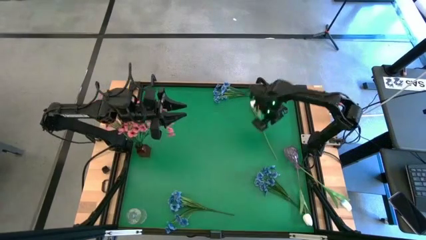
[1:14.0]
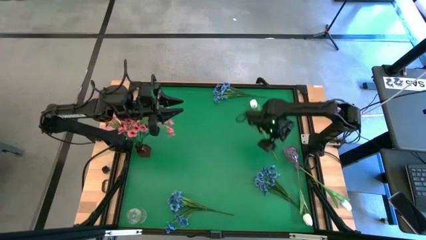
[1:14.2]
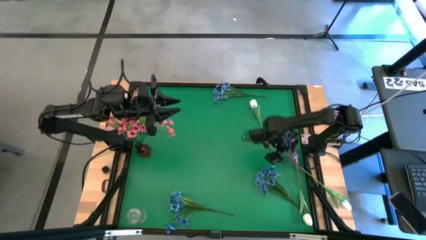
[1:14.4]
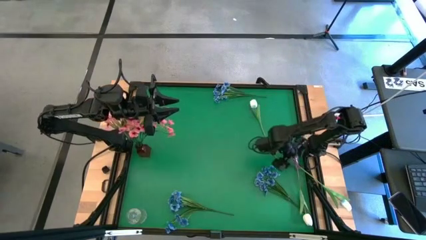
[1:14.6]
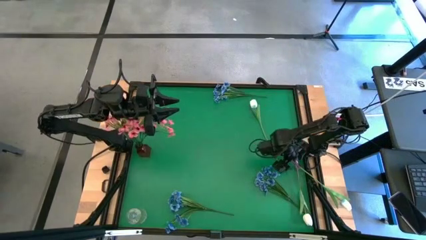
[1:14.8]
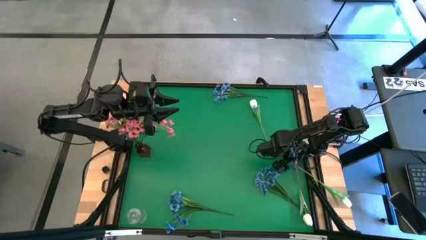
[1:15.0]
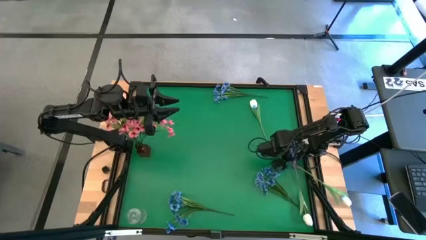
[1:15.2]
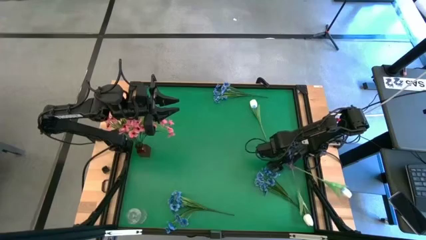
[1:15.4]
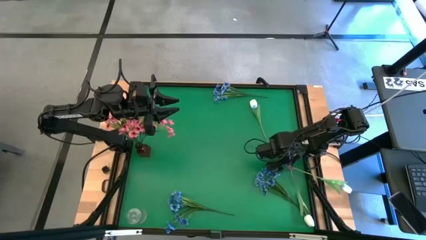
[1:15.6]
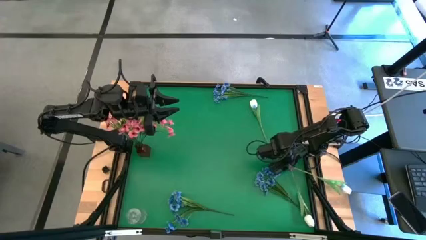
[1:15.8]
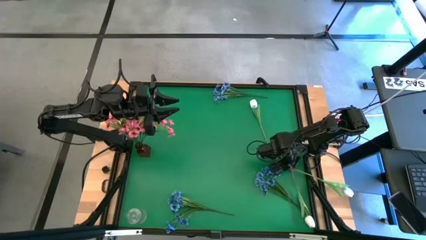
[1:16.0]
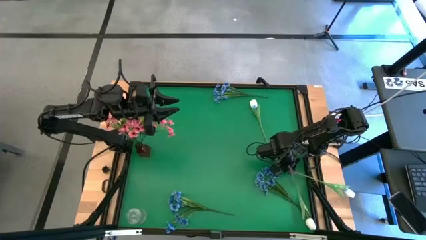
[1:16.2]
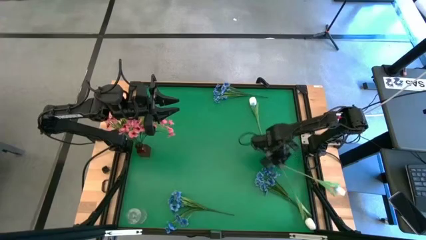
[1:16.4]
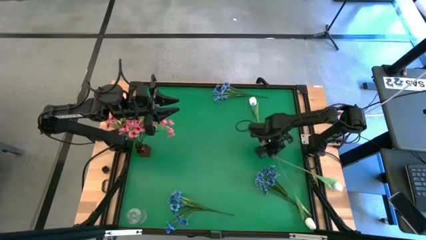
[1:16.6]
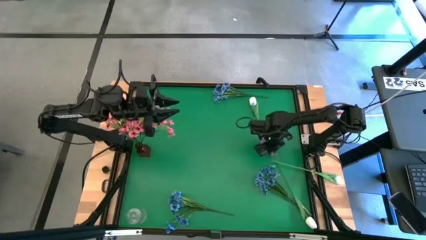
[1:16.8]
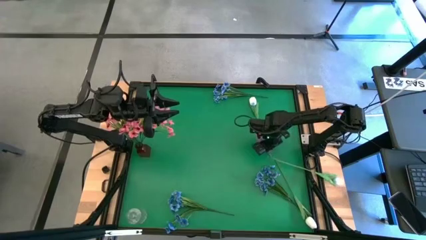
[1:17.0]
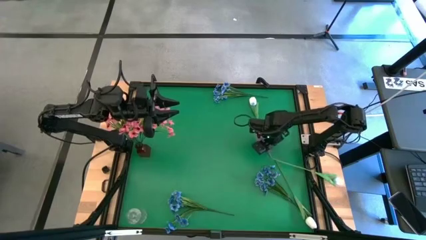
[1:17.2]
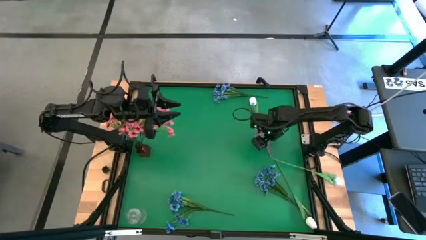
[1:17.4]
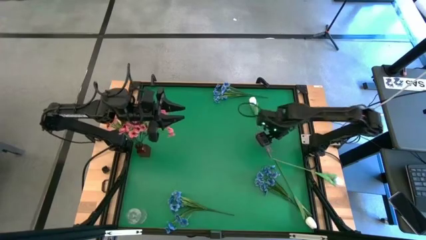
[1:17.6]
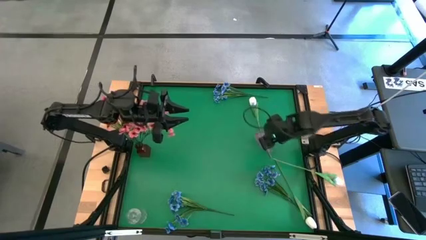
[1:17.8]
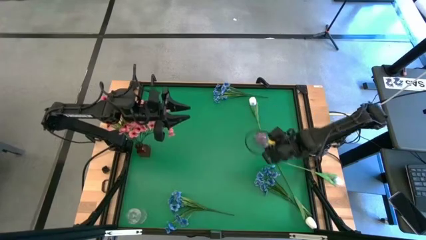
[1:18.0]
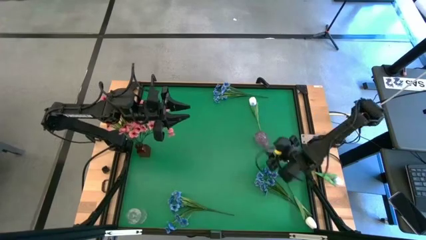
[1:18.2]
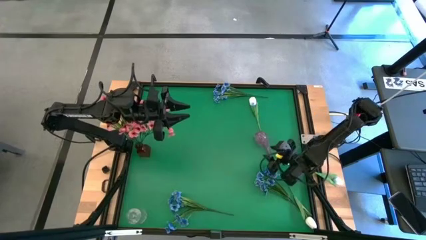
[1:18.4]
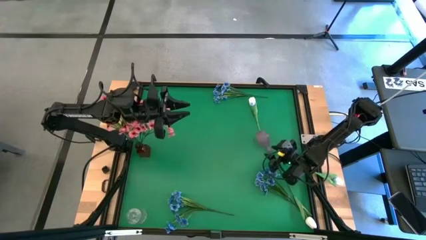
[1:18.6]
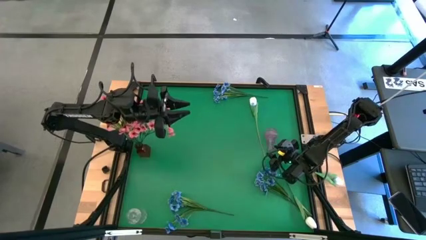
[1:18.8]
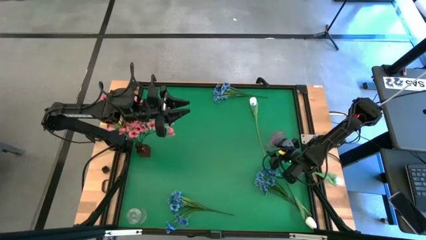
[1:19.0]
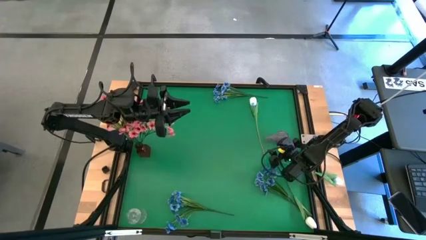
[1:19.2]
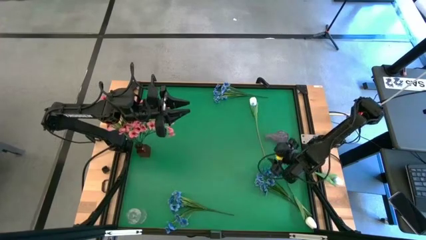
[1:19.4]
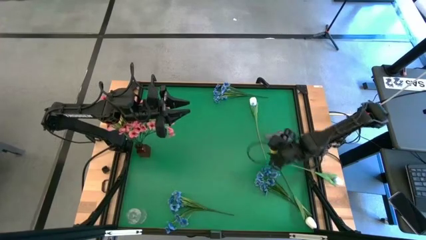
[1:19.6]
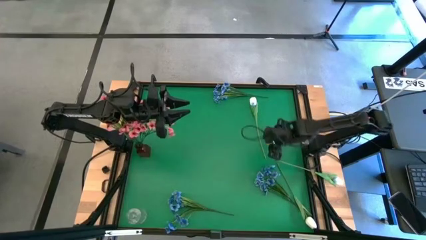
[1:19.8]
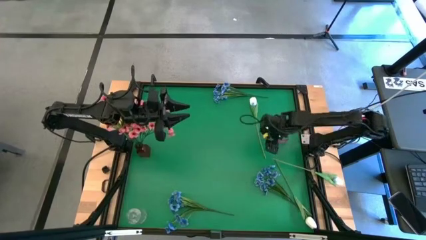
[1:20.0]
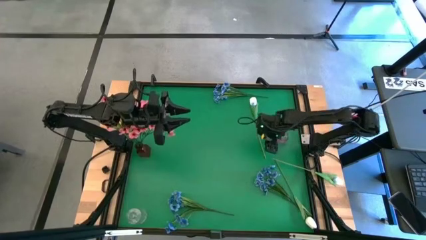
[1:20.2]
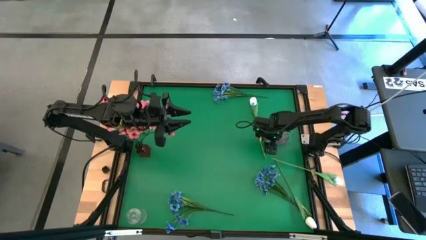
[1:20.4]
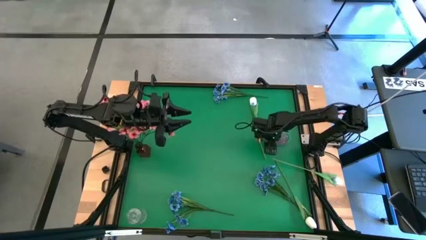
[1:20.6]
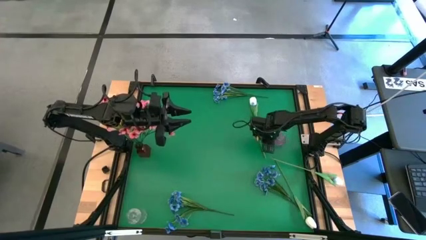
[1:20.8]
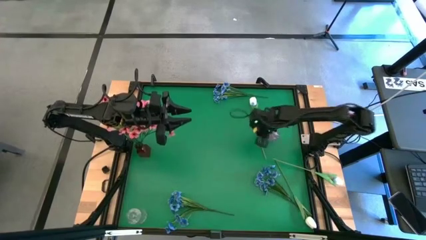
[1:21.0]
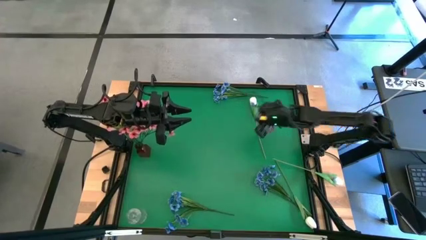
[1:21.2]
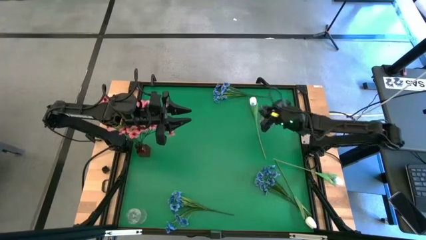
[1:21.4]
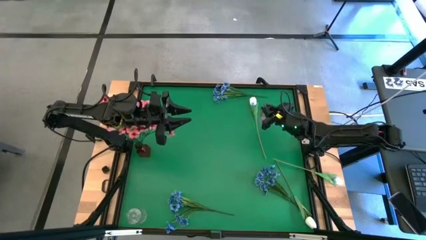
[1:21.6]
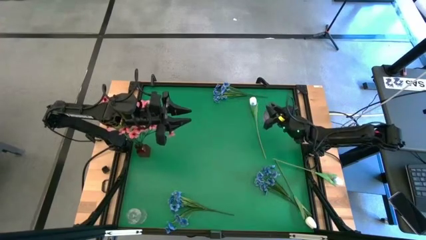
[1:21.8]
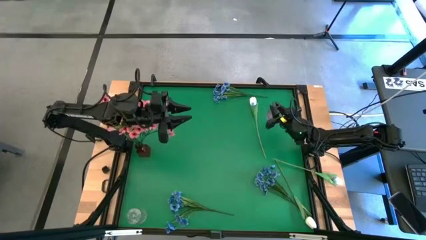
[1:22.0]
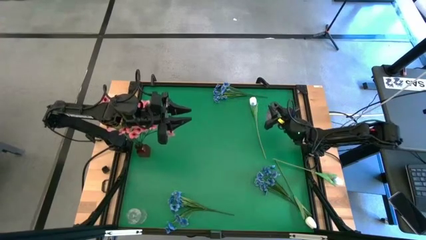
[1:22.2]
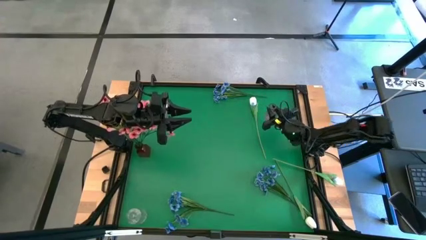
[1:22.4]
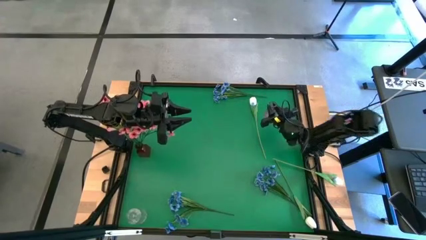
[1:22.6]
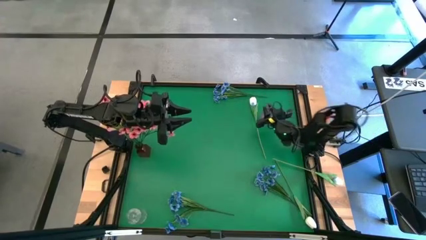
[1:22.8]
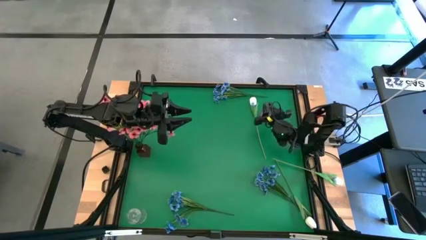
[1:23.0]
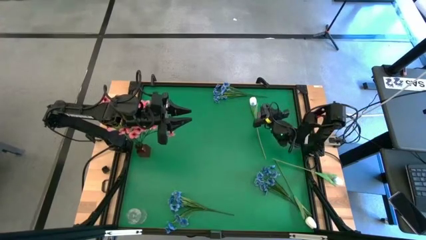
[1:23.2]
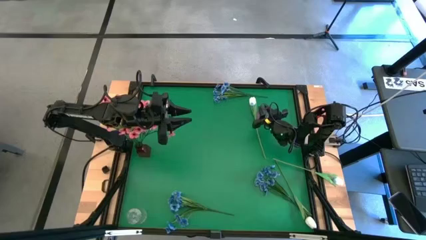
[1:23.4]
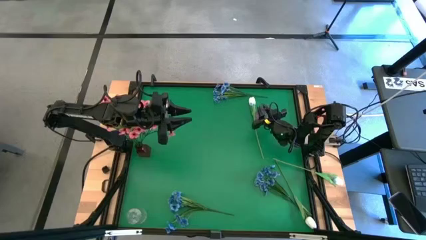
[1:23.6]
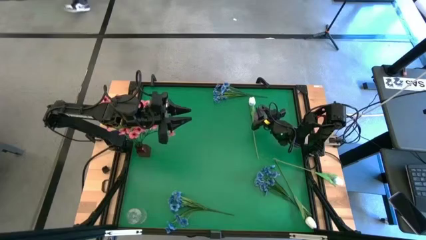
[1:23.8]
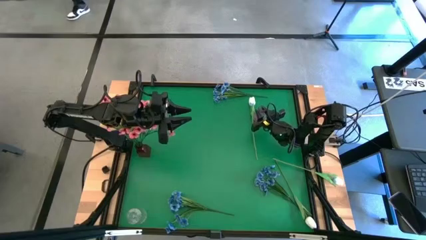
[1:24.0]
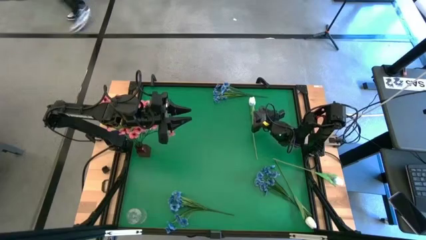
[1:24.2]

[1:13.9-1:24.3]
Task: Sort flowers into vase by color
Adjust the violet vase

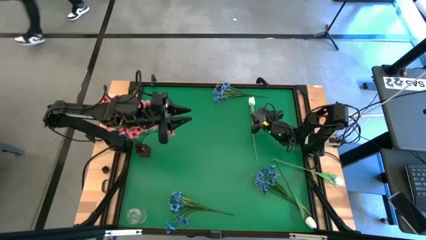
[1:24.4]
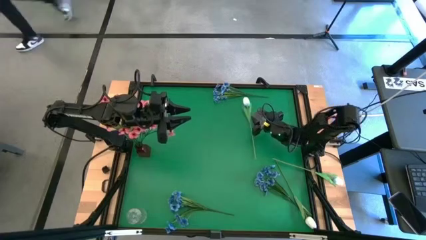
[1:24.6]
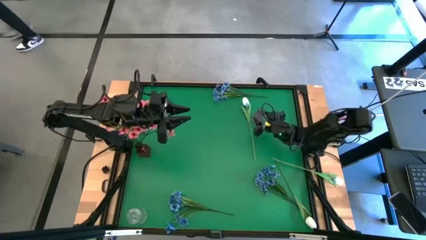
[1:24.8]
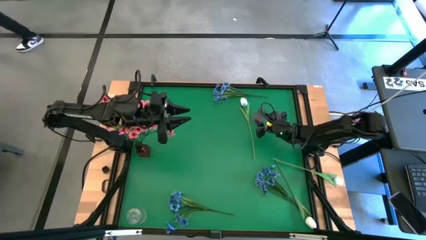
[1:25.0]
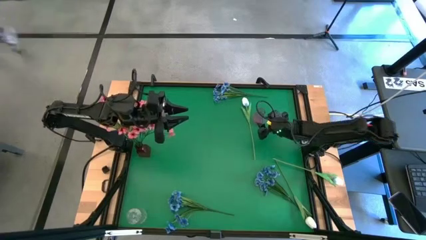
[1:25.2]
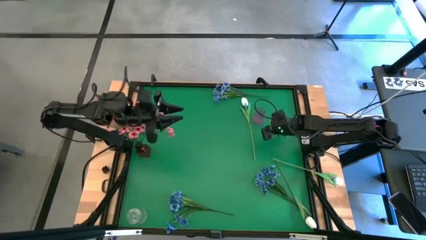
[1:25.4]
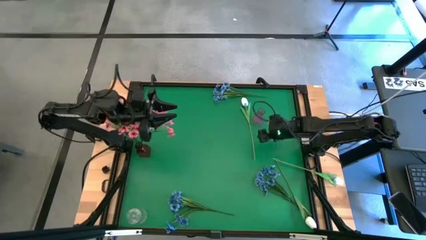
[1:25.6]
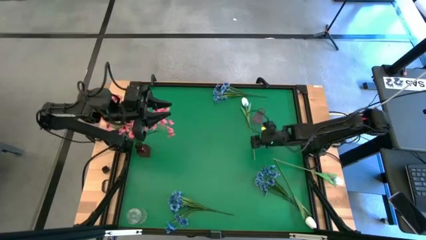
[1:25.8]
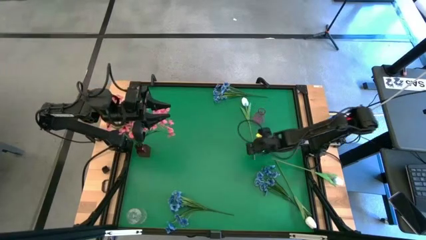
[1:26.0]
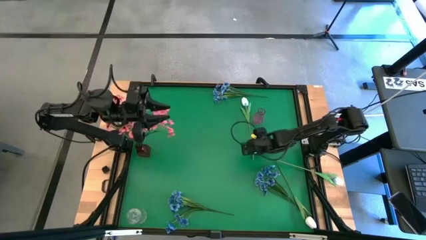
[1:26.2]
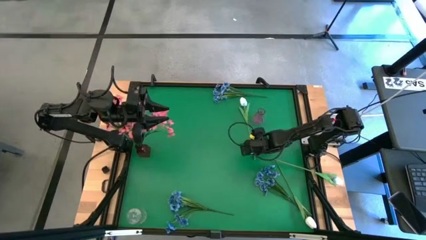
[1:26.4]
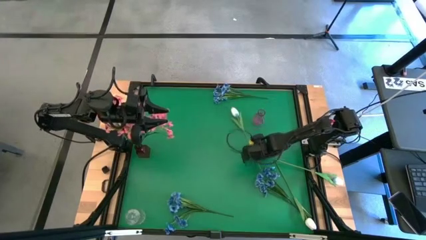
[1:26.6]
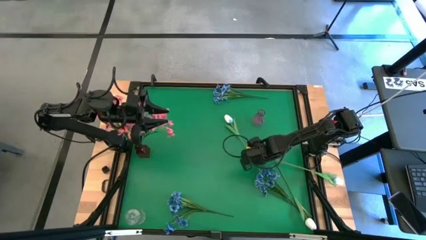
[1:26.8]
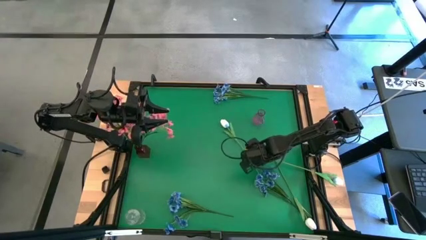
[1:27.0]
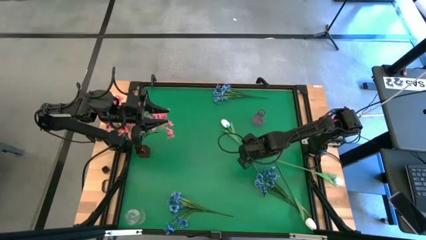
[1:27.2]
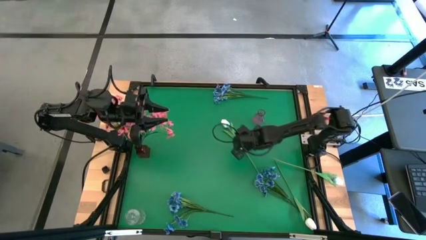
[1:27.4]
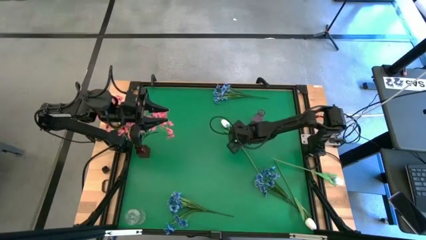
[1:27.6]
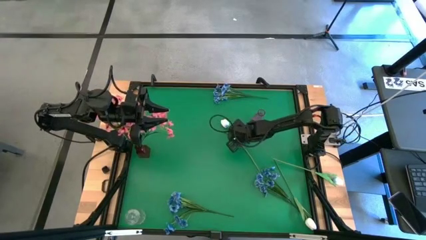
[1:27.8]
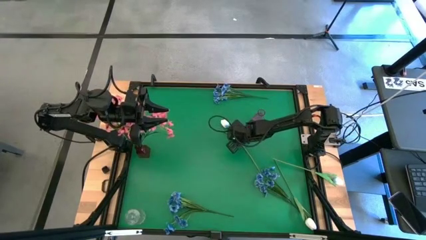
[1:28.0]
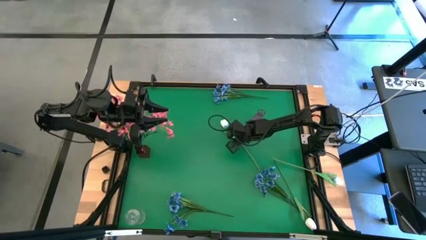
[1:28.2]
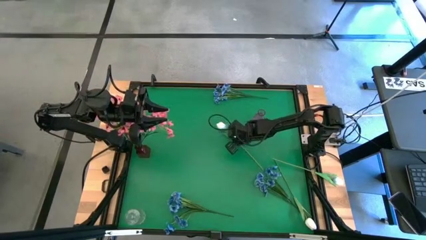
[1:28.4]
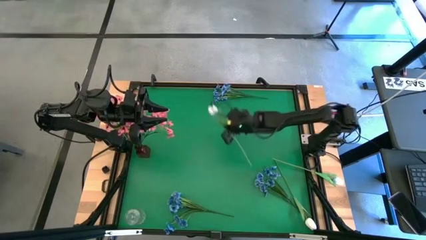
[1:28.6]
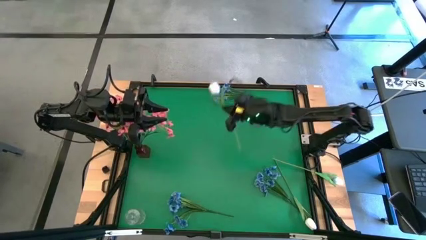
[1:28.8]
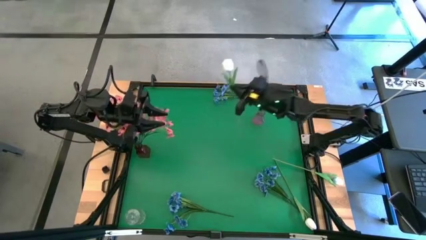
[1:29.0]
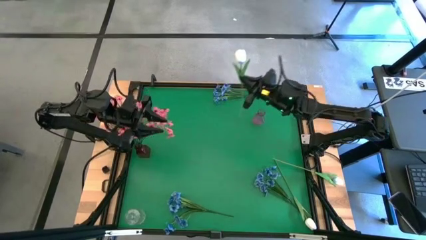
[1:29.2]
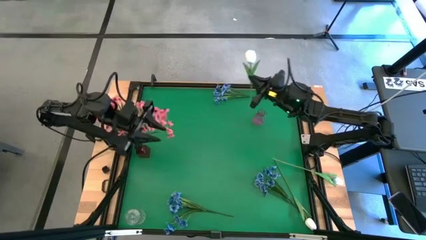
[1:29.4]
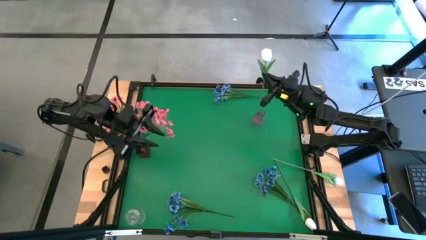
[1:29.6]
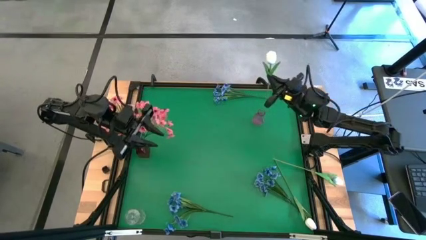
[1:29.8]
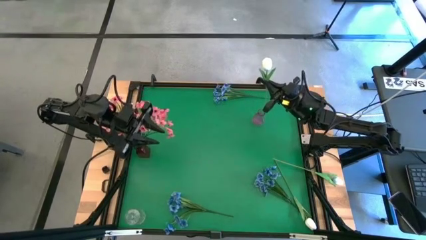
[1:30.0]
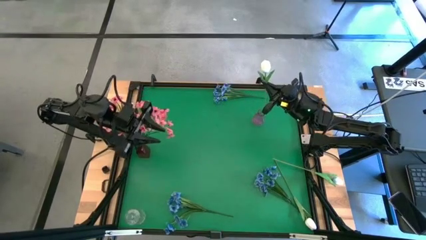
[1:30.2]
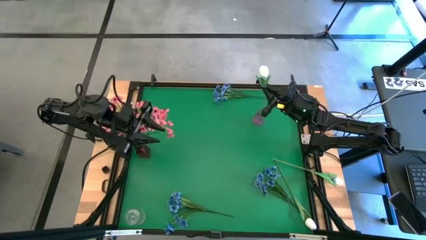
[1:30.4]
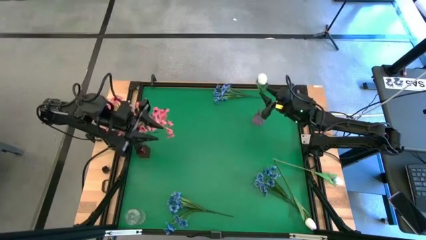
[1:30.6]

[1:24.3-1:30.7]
Put the top left white flower into the violet vase

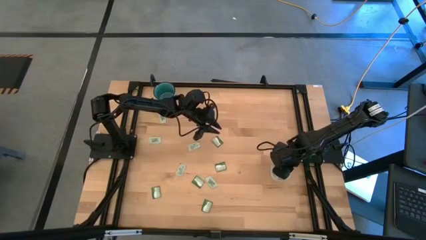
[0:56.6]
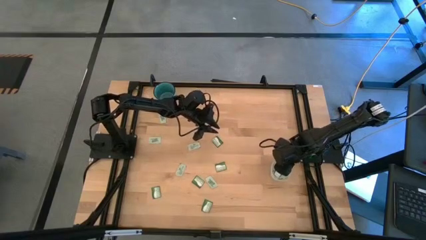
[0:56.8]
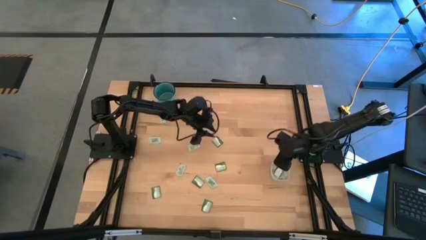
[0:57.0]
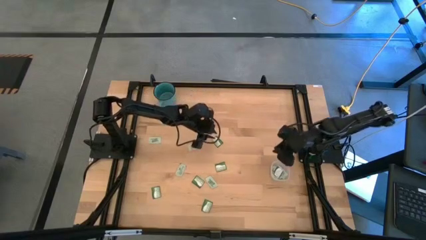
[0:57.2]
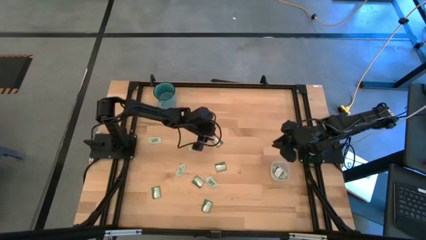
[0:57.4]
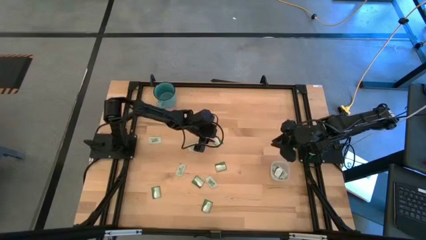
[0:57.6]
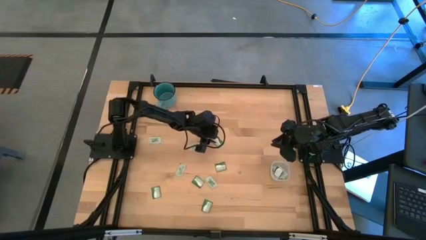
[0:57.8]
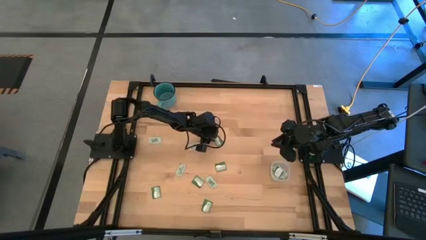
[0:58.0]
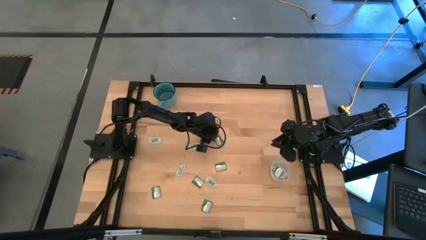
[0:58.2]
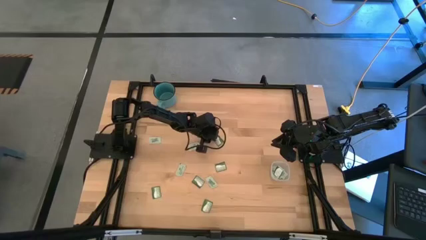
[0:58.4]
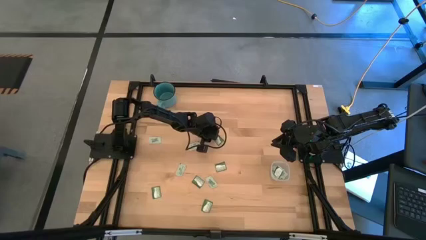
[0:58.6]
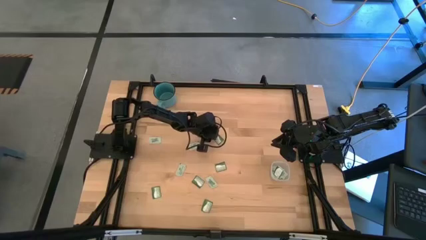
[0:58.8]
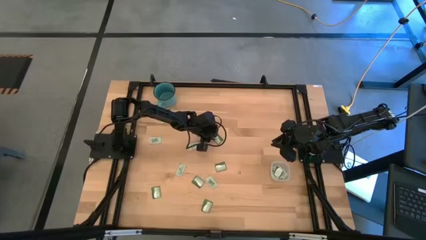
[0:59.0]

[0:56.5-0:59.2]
Task: Pick and place items into bin
Put the green stevia packet into the transparent bin
